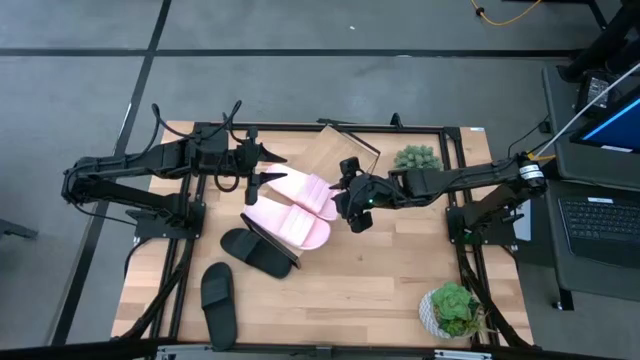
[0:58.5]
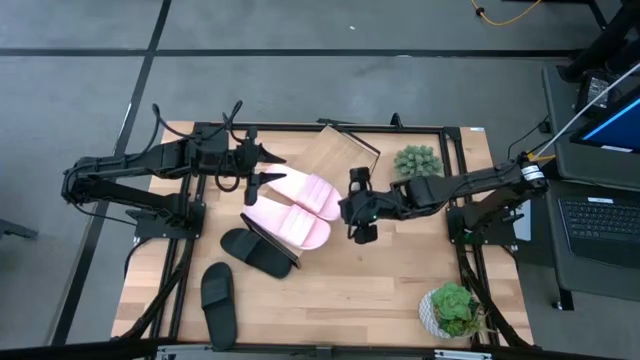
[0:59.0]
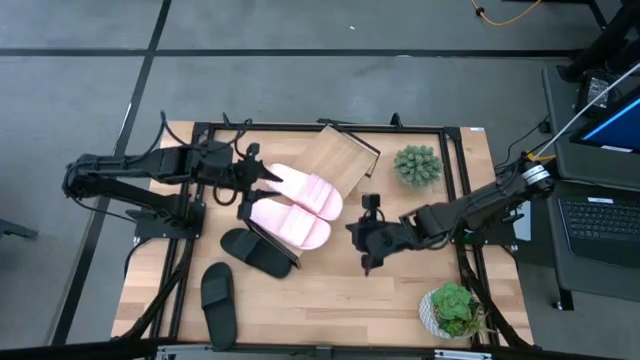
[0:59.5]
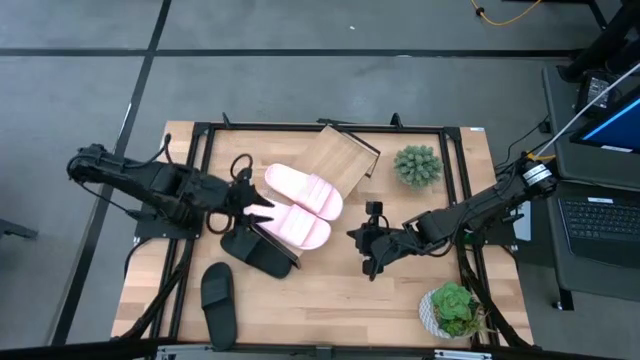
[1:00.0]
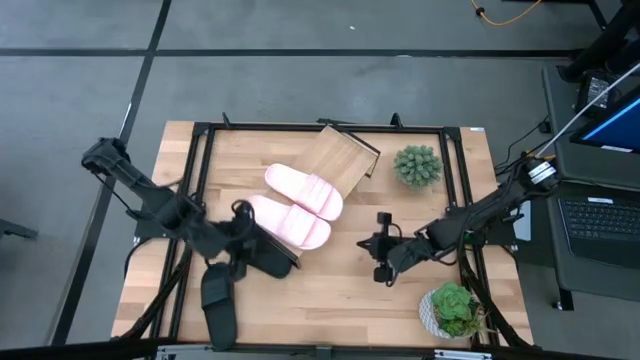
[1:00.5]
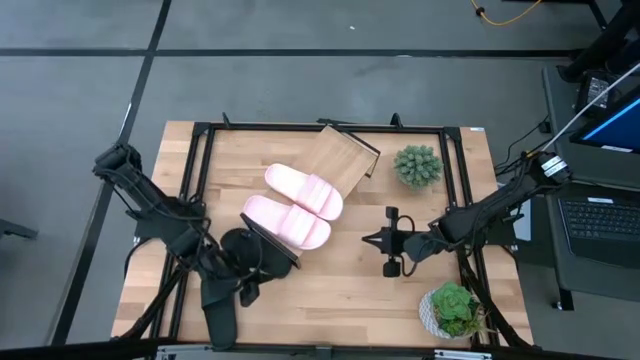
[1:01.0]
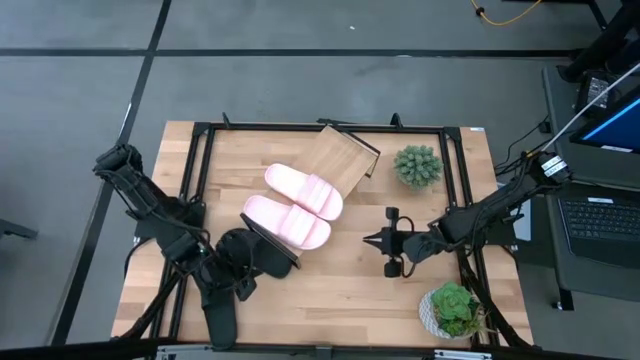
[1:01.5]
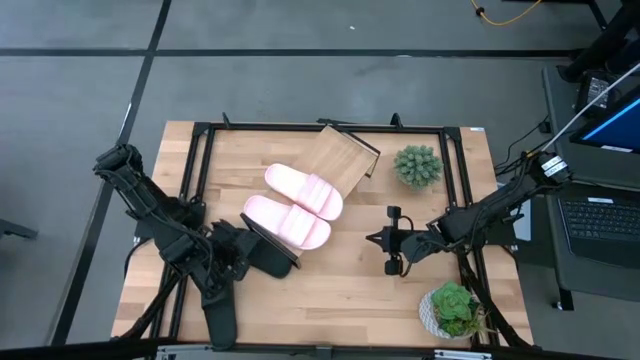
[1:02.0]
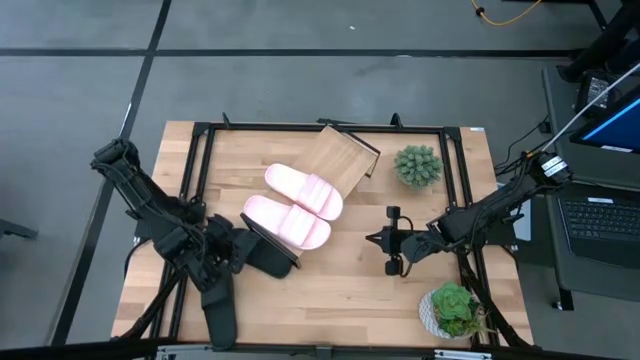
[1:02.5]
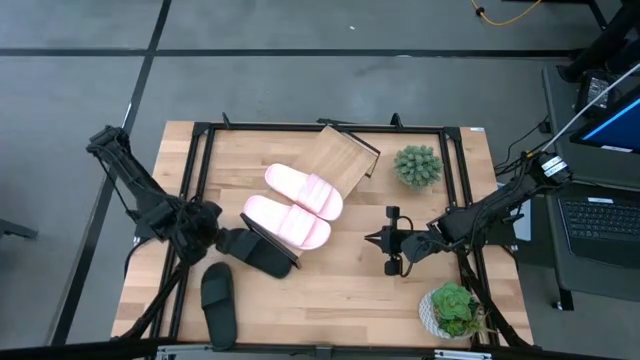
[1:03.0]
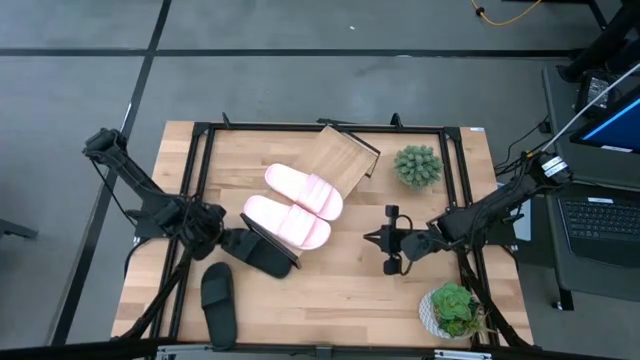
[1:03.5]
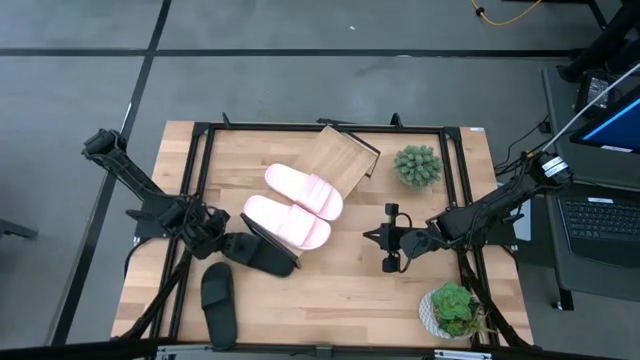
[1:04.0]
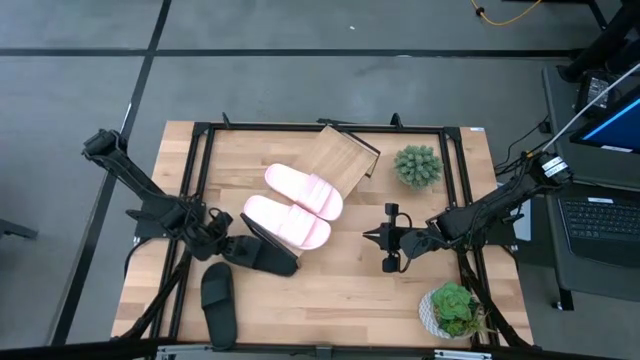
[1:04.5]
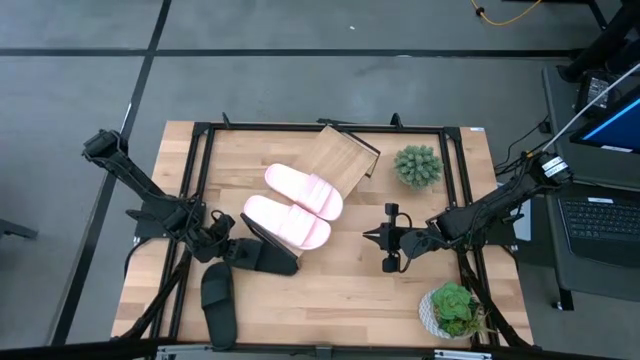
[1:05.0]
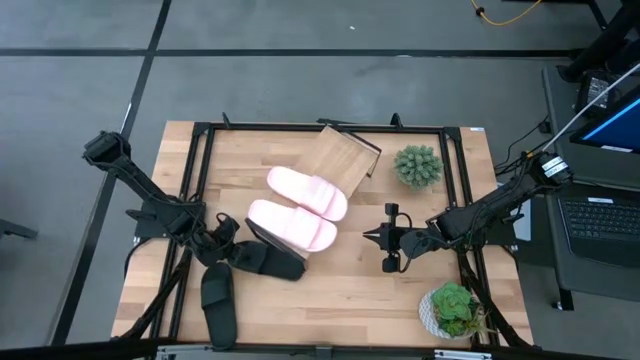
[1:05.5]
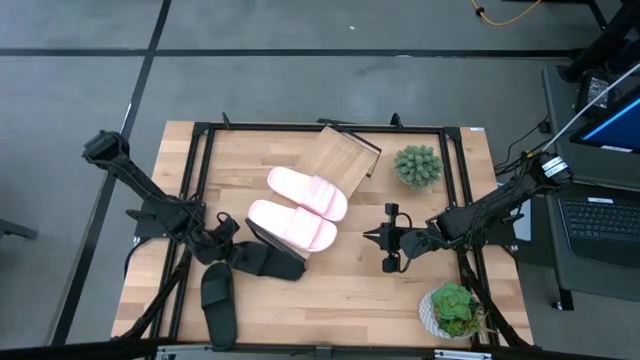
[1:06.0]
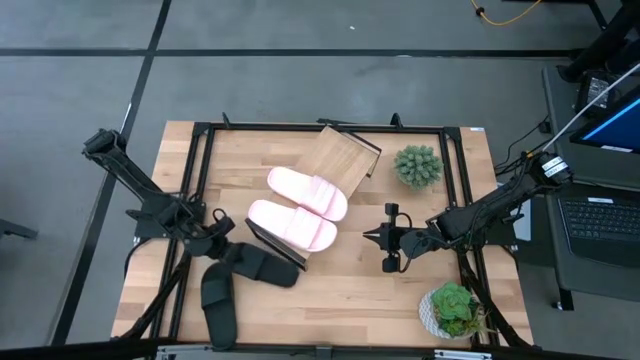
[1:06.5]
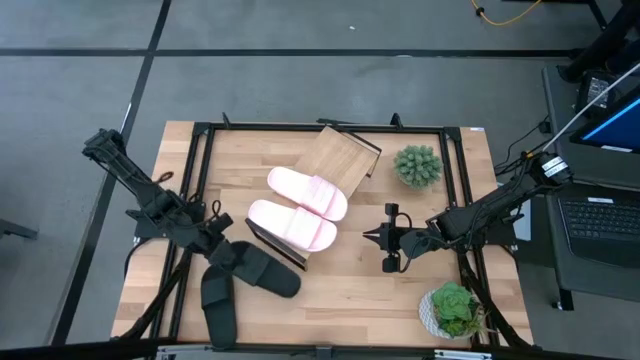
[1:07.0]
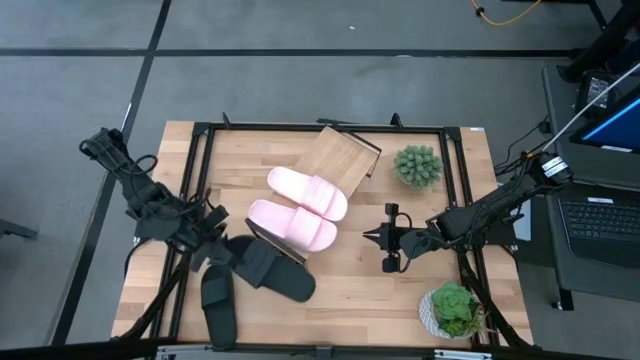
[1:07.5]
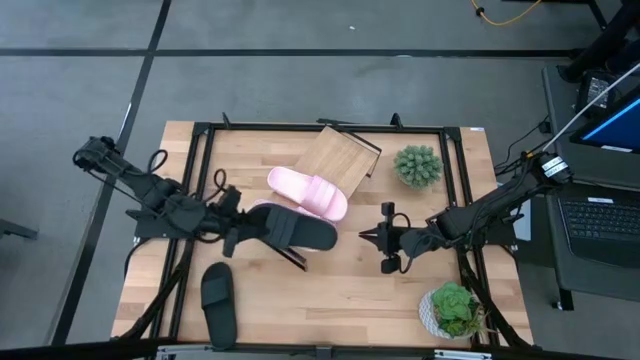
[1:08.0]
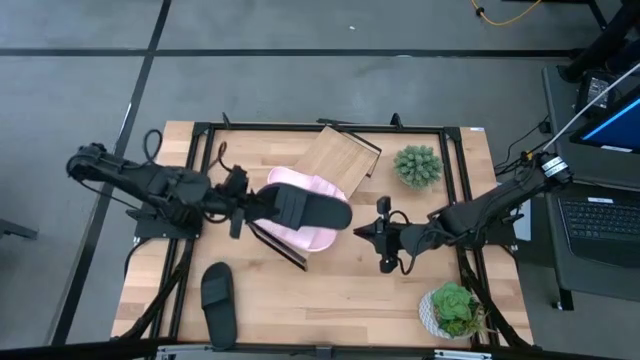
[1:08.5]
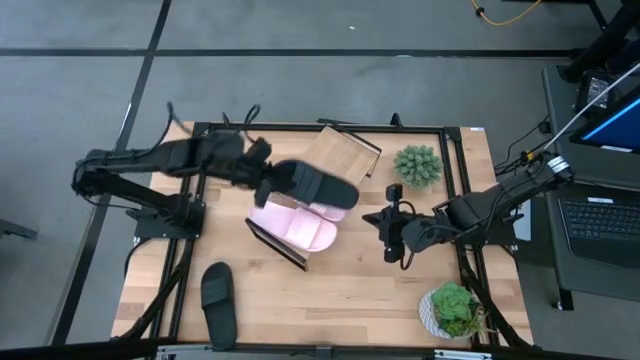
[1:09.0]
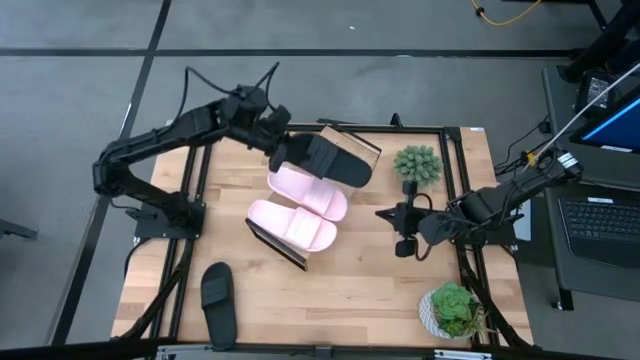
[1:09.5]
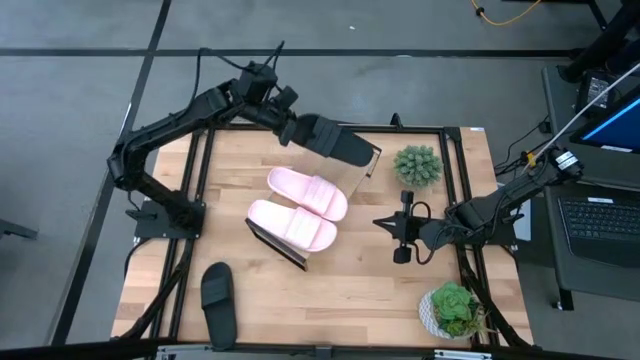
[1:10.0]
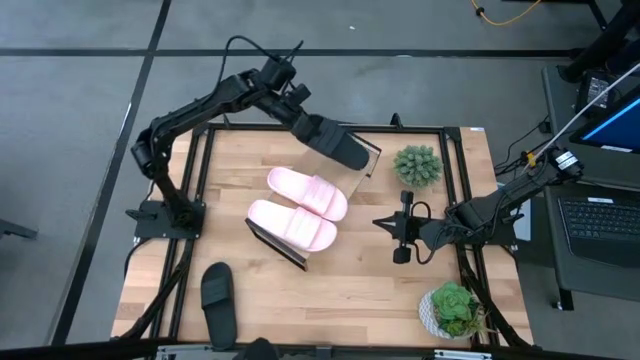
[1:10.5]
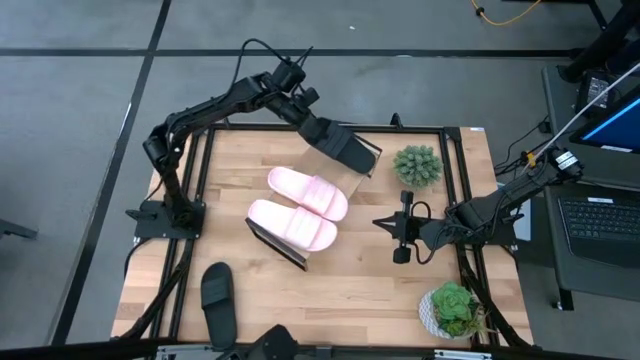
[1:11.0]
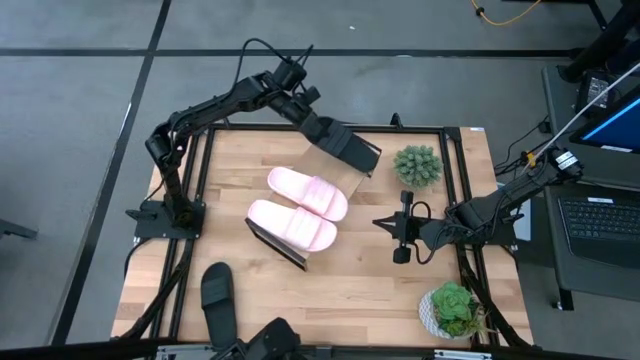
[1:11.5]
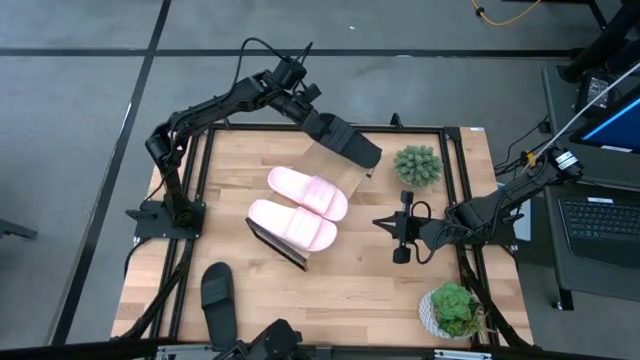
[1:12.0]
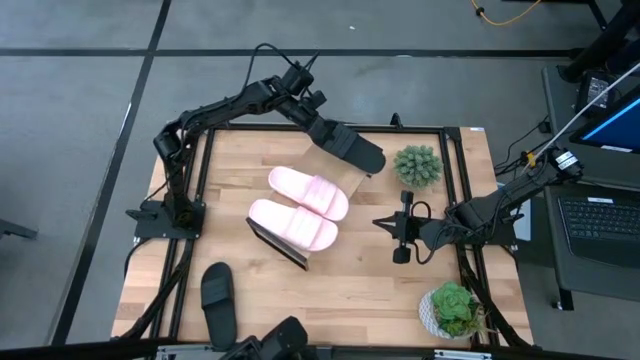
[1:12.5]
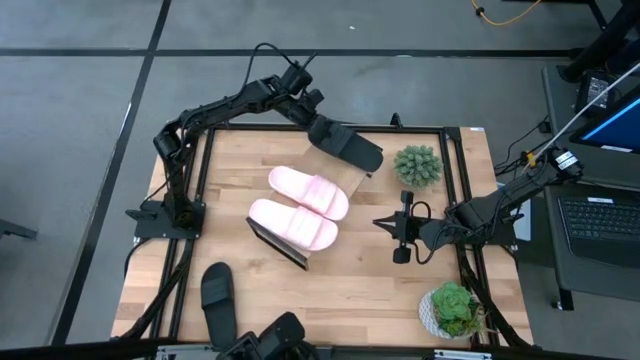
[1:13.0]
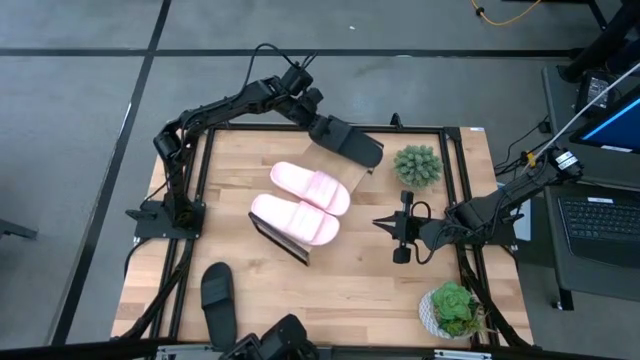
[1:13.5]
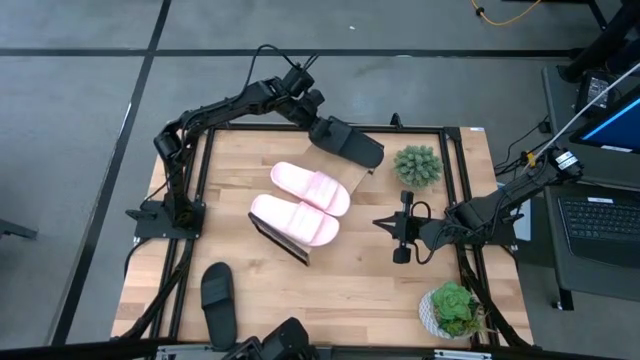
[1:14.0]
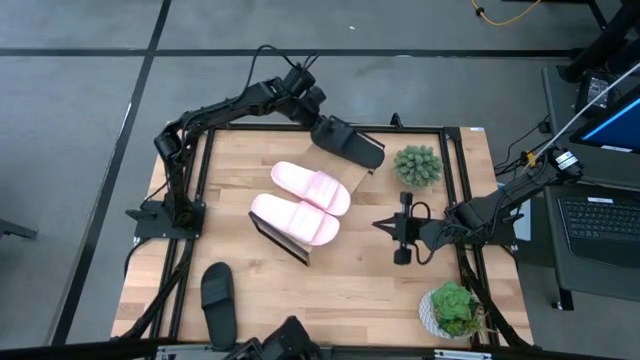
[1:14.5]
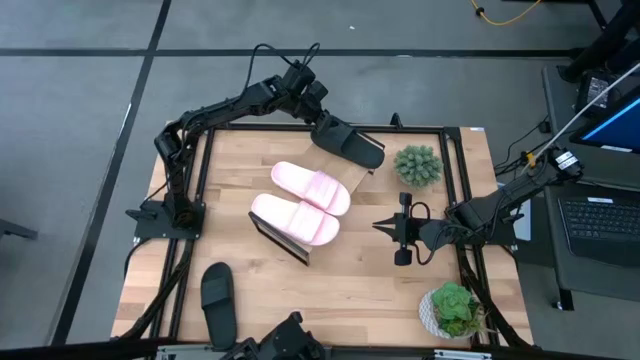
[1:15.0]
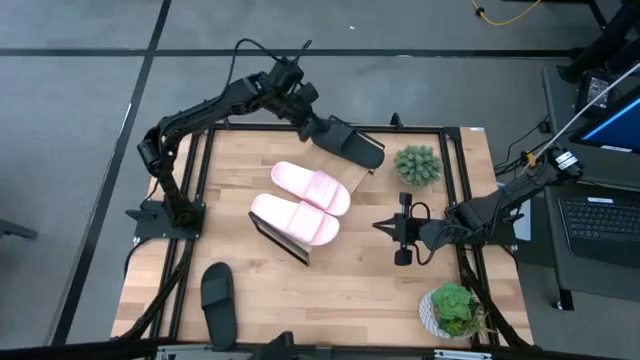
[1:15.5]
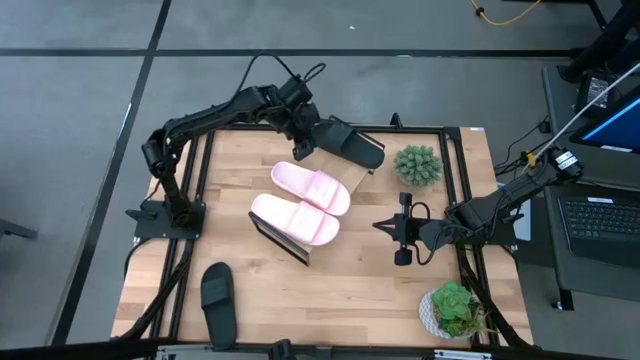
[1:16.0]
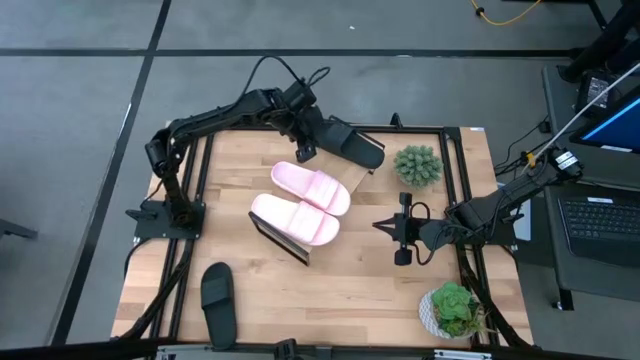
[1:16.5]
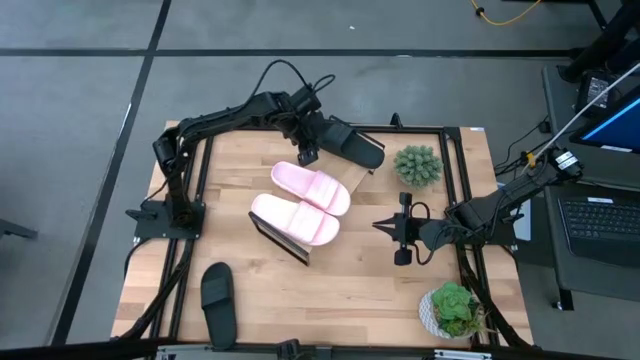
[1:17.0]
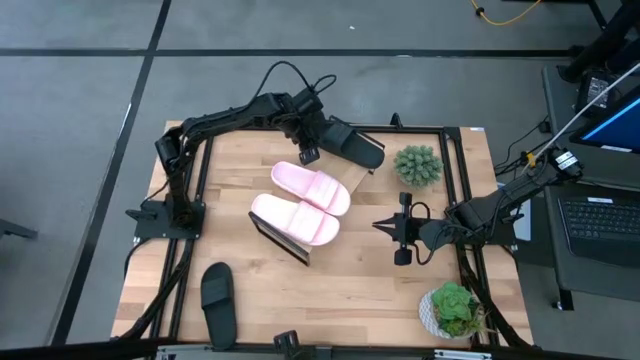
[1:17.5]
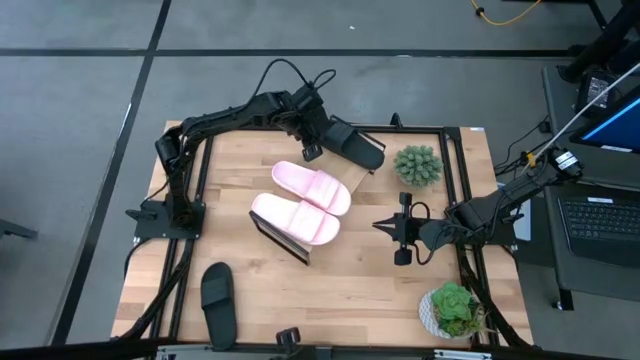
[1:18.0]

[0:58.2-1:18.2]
Task: Pick and place slides into the shelf
Put the top black slides on the shelf

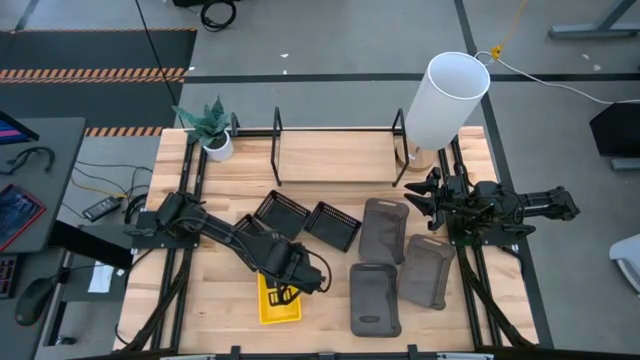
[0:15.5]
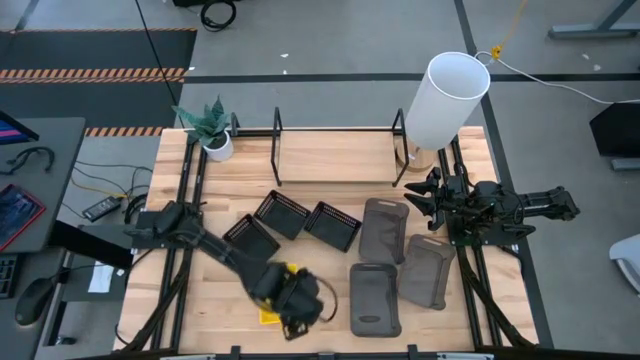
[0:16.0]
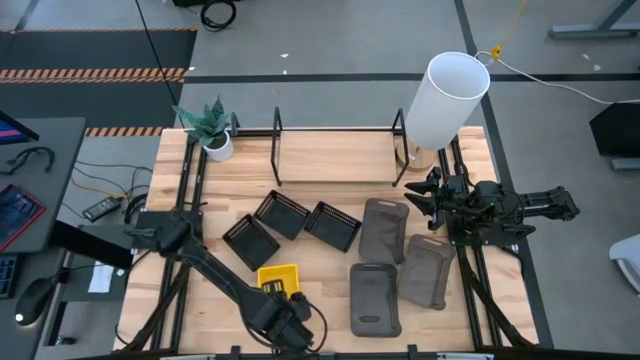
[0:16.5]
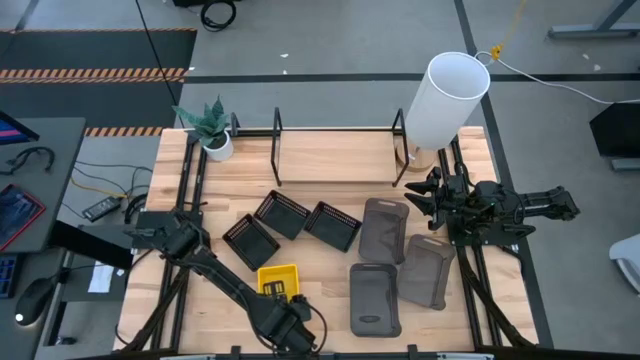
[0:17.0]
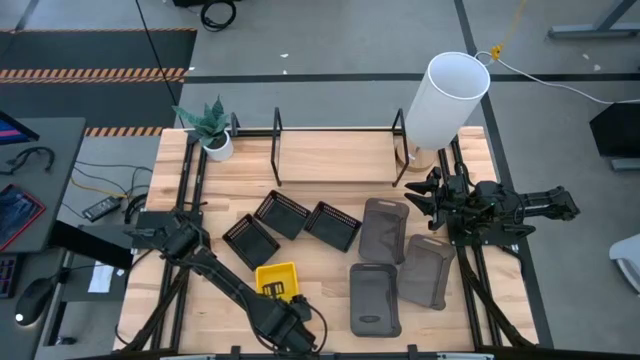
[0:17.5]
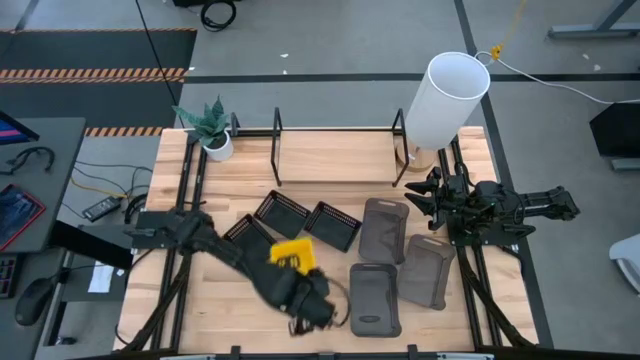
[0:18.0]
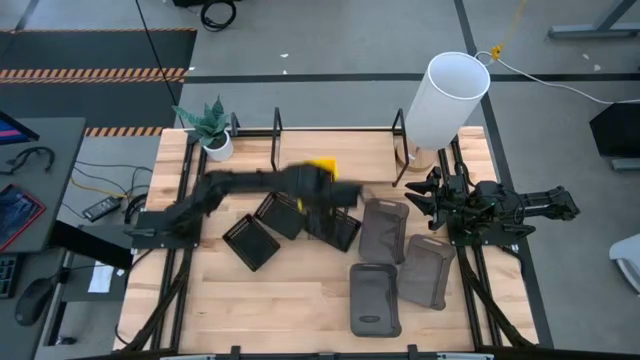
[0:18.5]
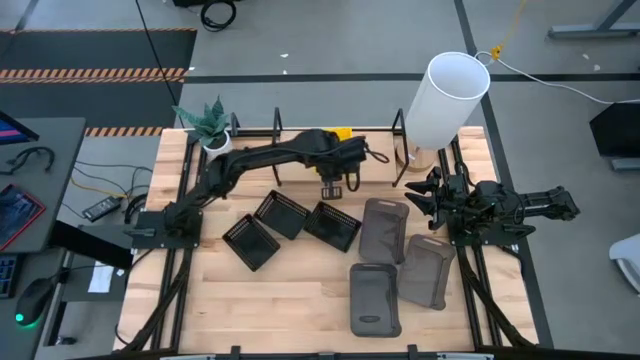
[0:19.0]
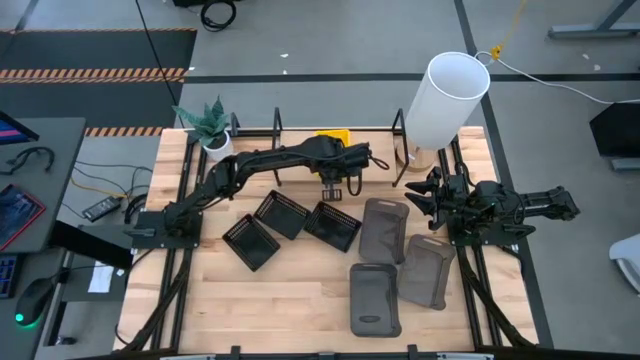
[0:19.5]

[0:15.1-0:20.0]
Task: Stack baskets on shelf by color
Put the stacked yellow bins on the shelf
